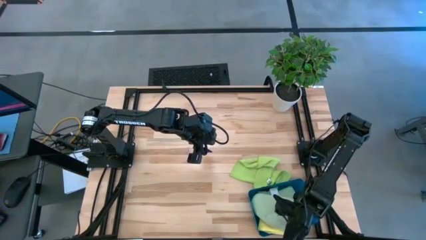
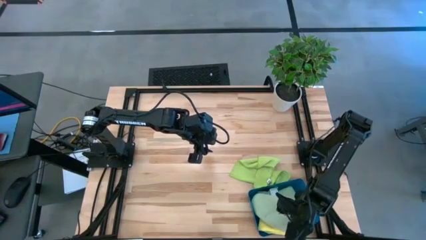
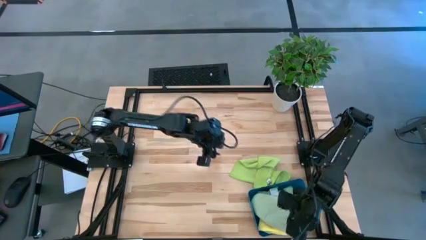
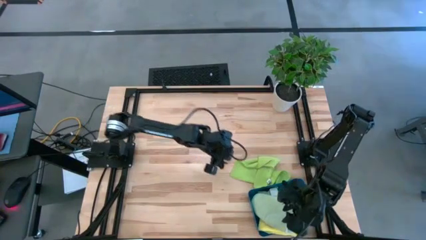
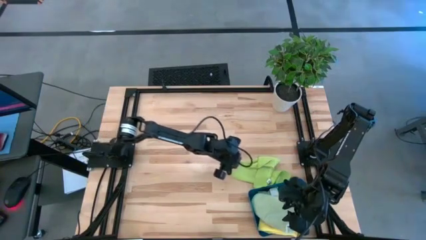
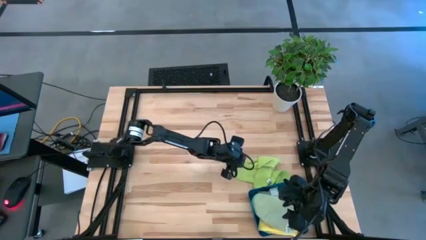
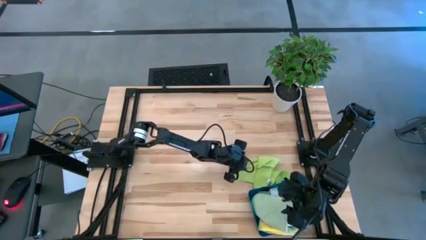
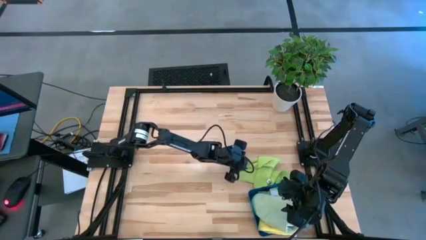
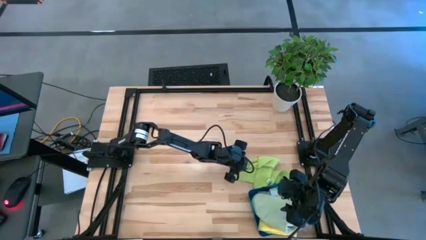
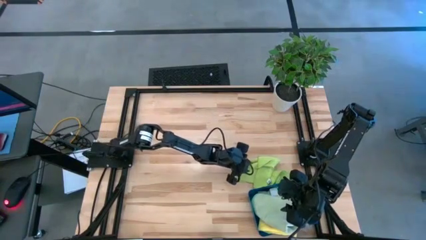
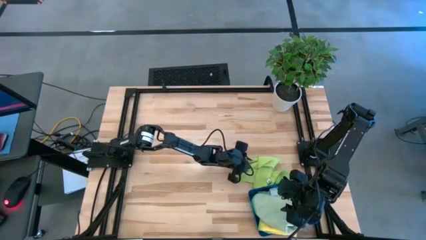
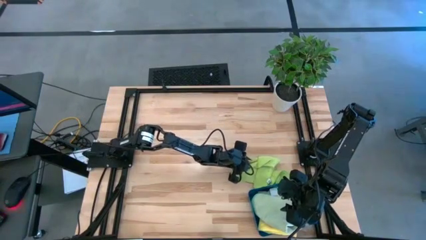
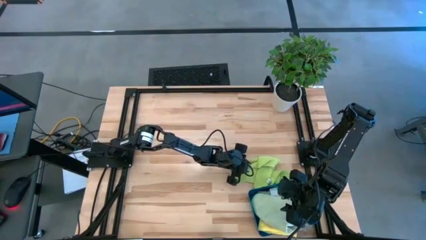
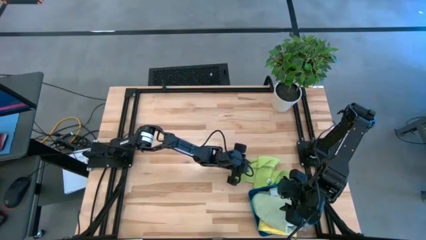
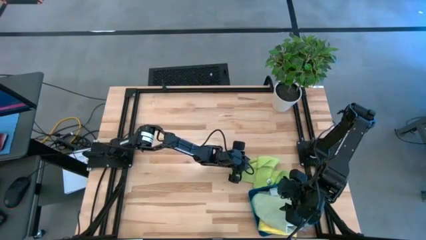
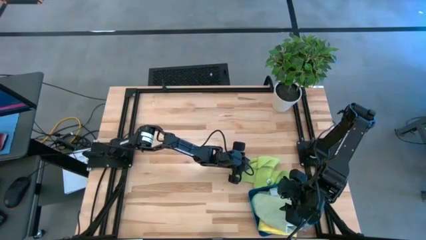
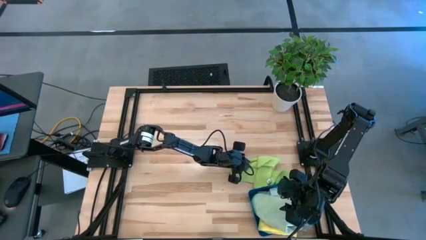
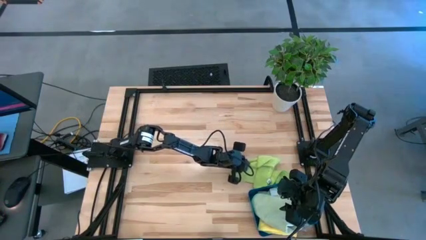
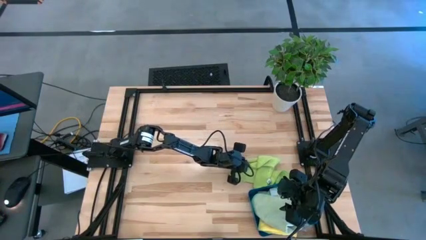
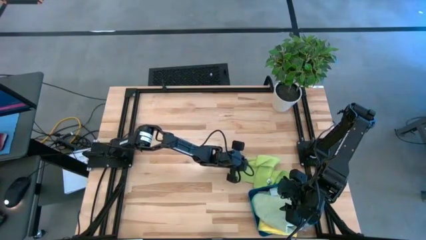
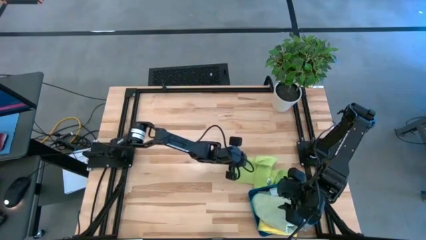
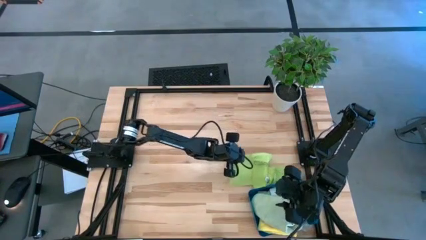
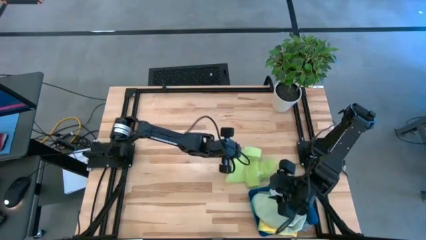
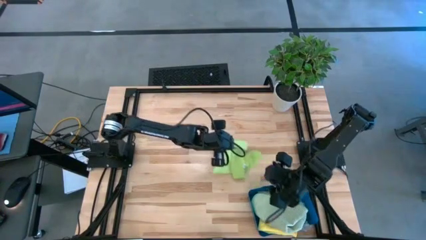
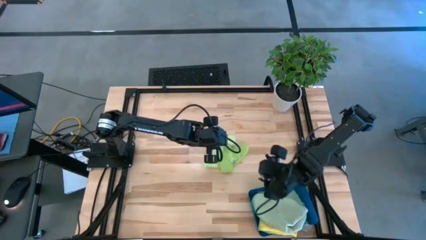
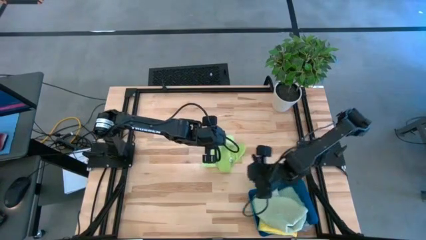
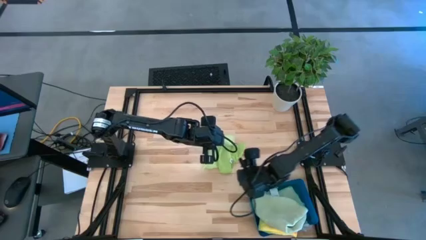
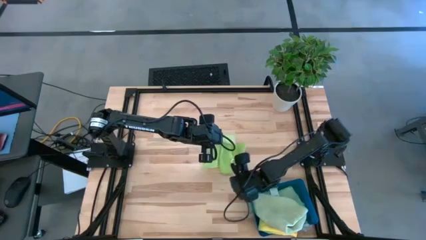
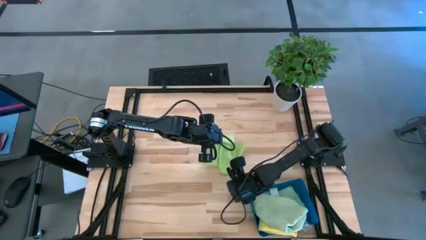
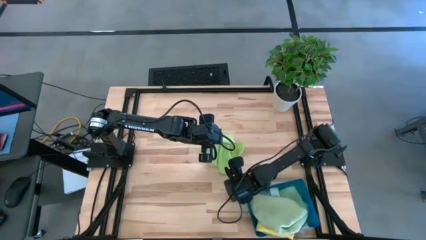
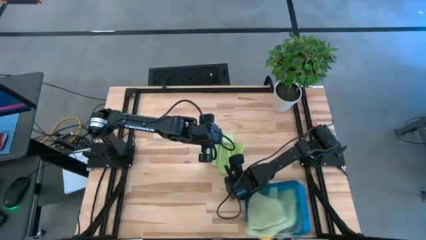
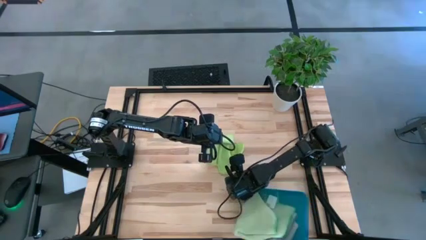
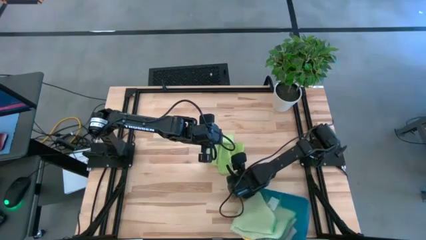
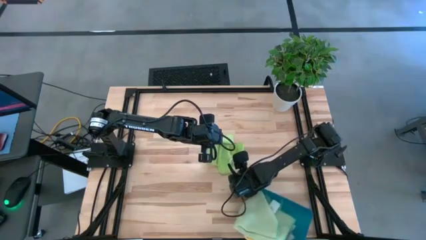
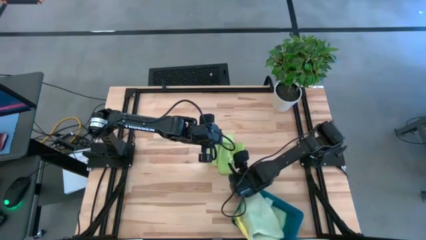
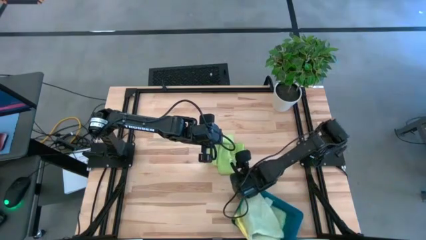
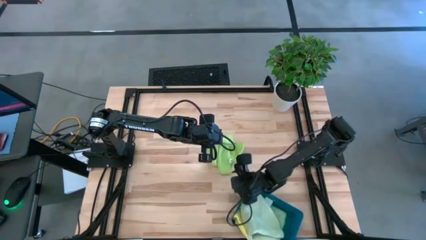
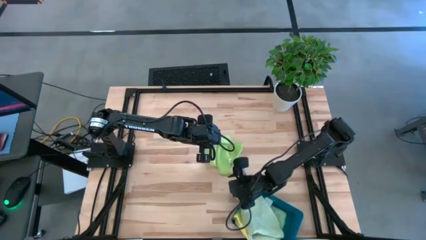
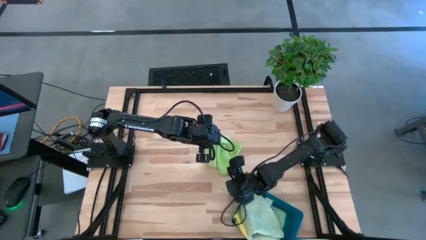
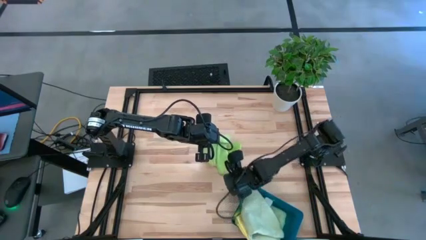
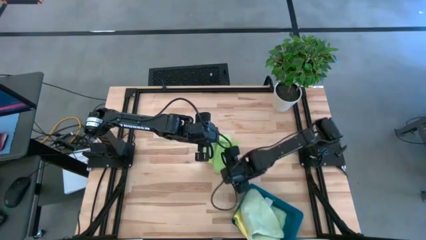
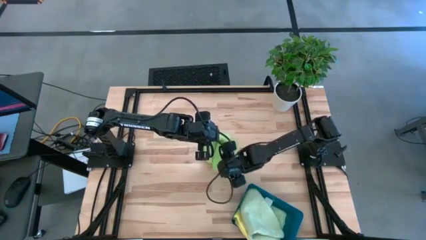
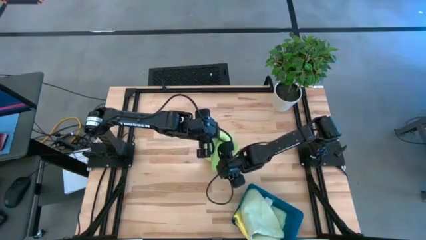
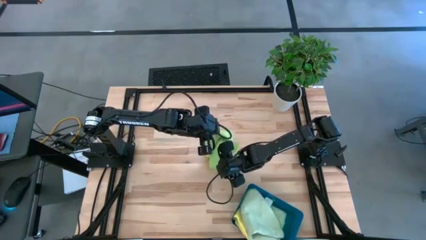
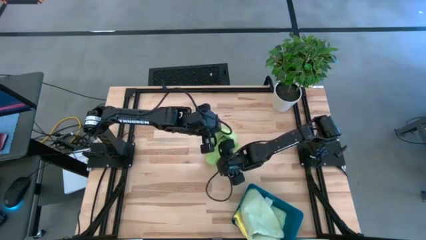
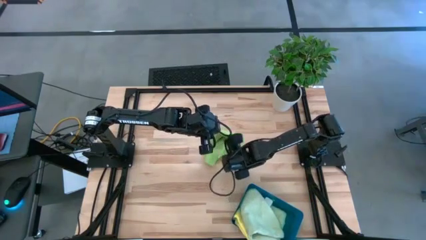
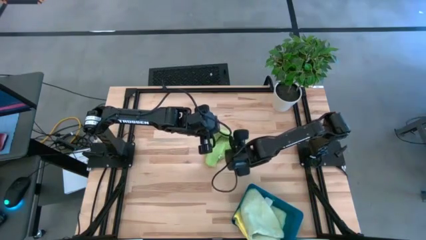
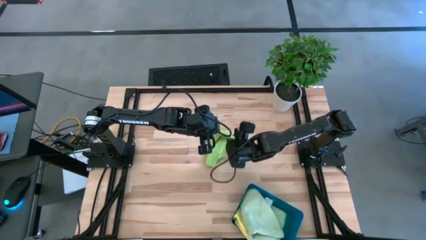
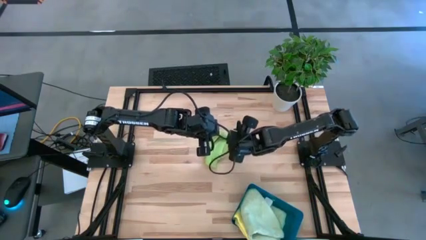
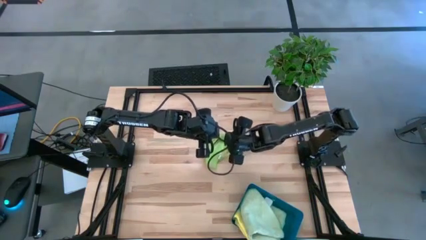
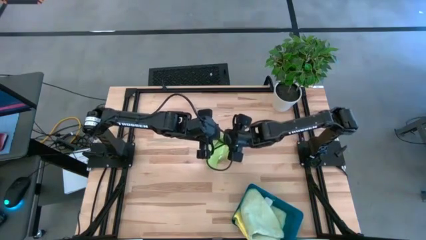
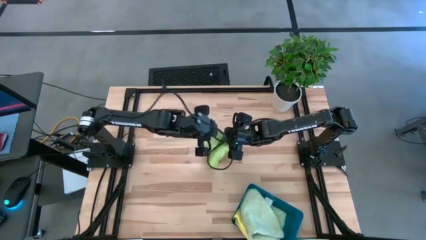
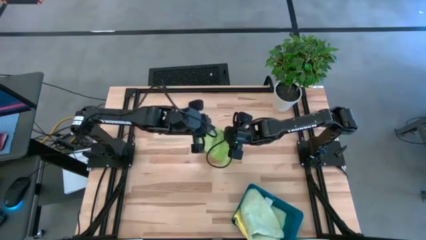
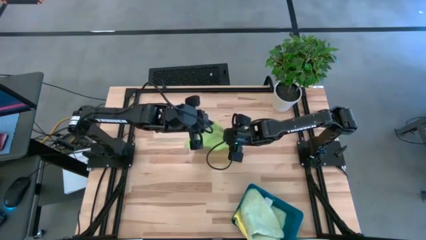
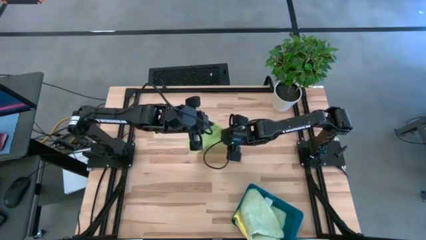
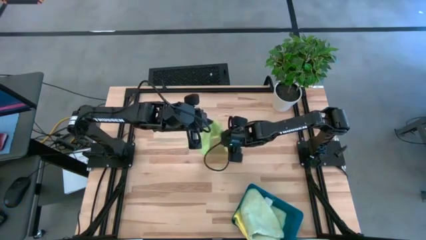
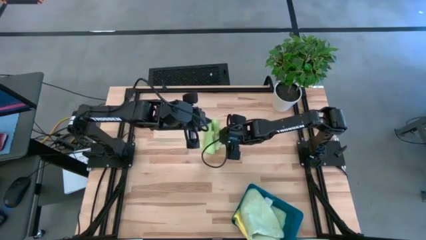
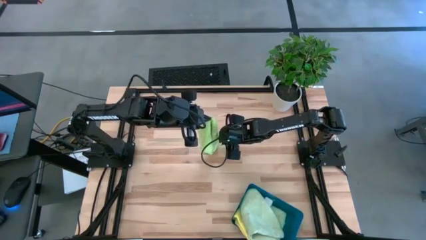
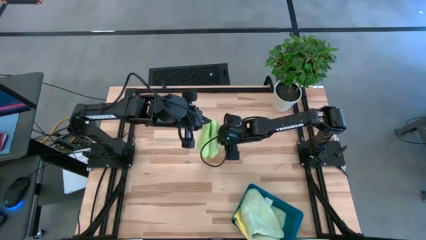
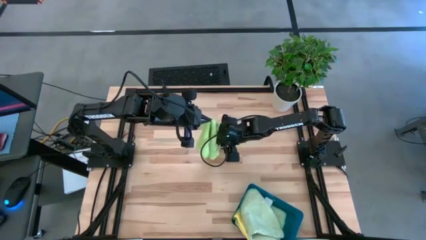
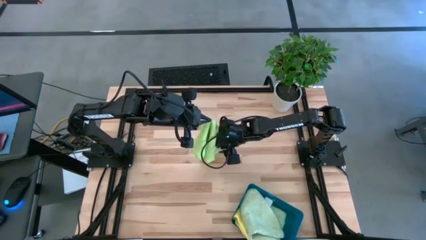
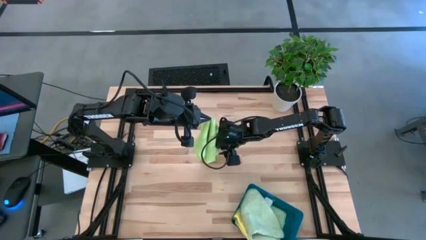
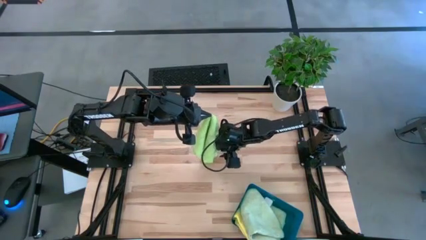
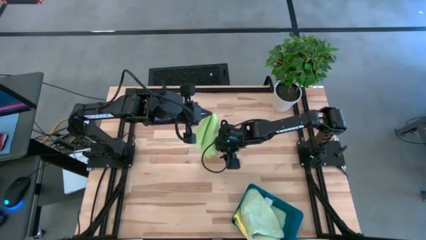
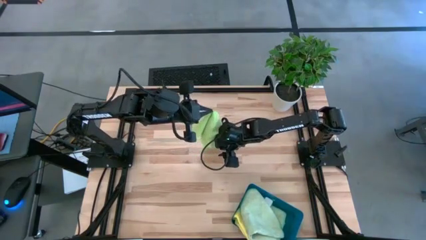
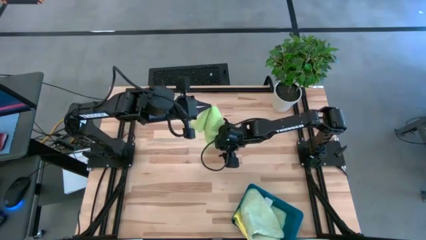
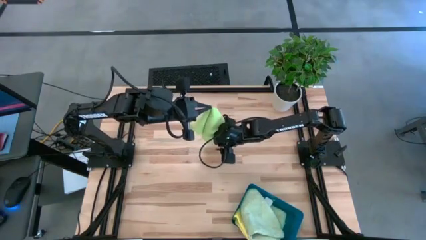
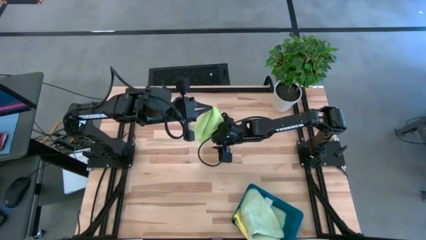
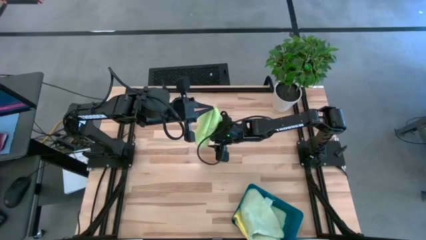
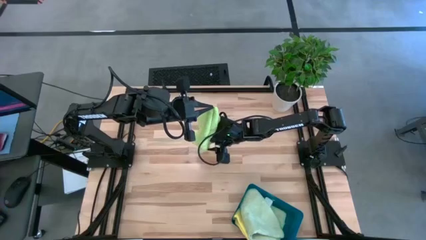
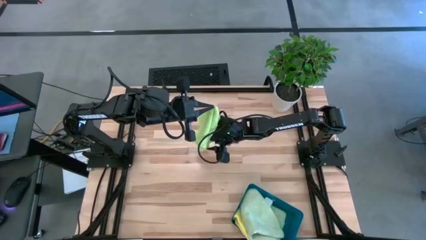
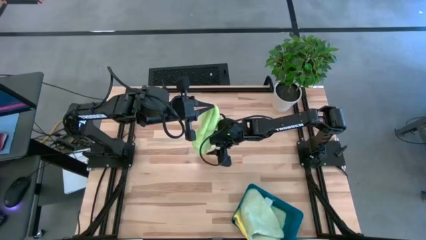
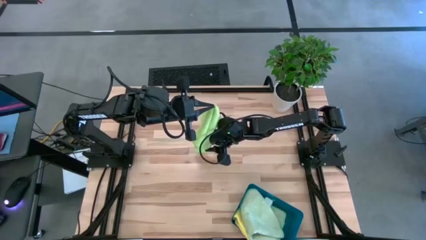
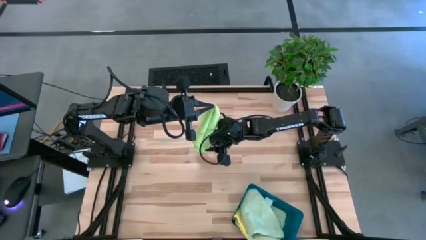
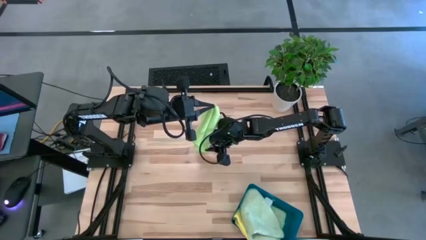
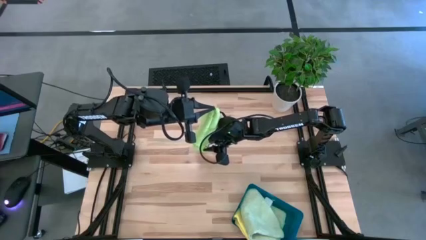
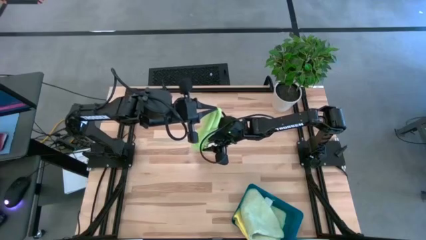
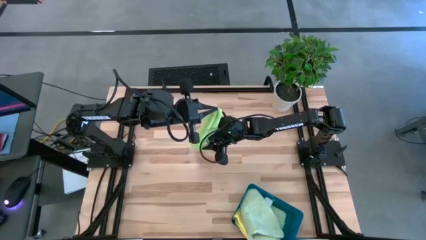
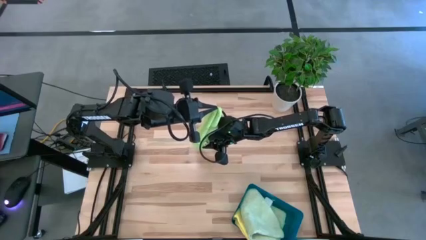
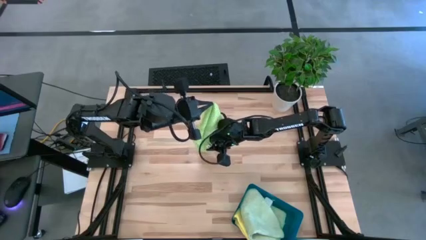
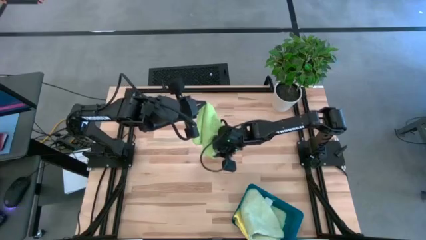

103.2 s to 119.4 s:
Task: Fold microfiber towels
Fold the green towel
